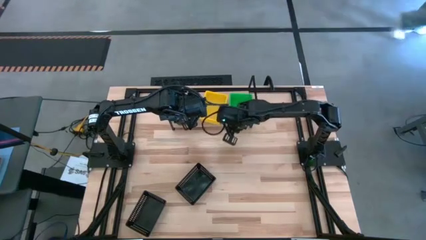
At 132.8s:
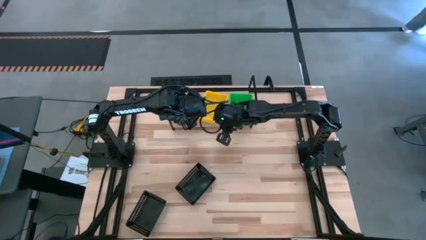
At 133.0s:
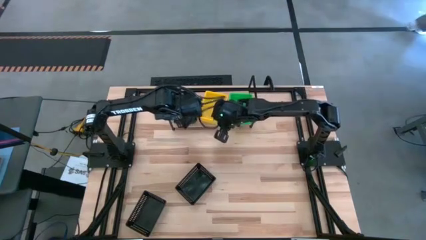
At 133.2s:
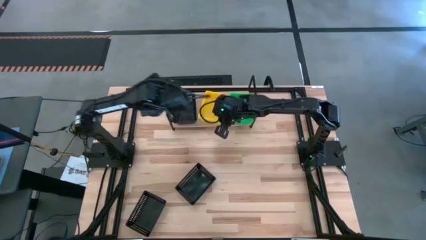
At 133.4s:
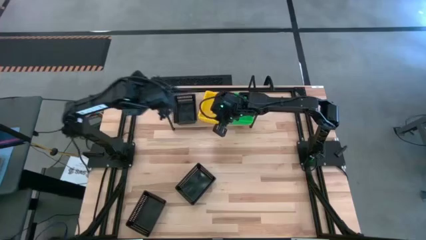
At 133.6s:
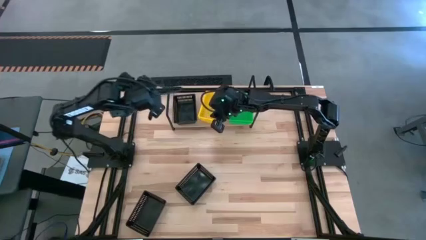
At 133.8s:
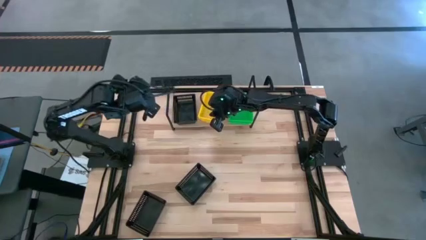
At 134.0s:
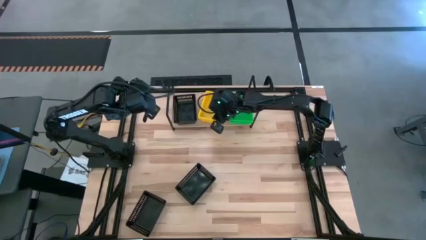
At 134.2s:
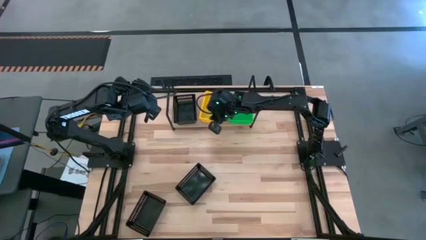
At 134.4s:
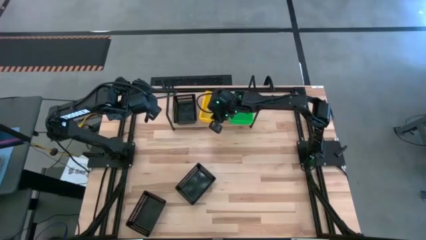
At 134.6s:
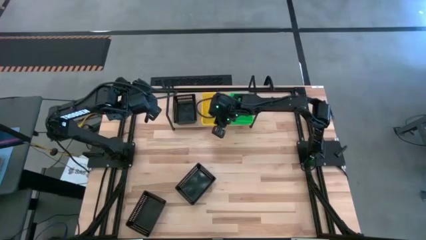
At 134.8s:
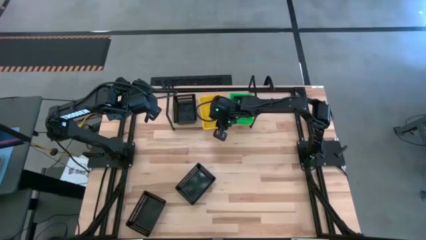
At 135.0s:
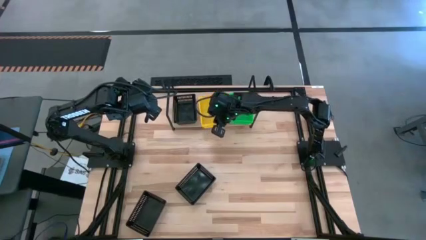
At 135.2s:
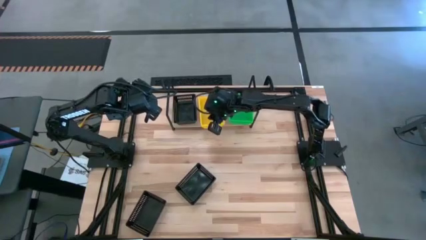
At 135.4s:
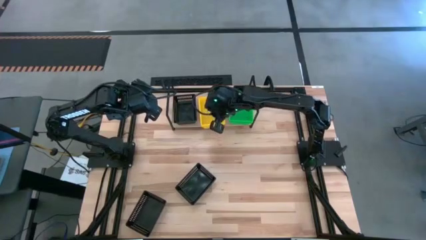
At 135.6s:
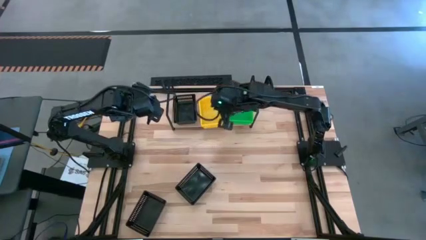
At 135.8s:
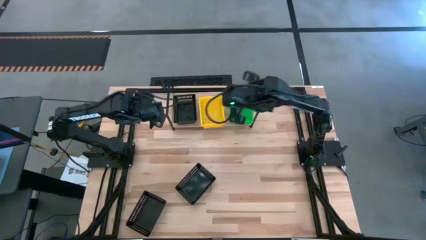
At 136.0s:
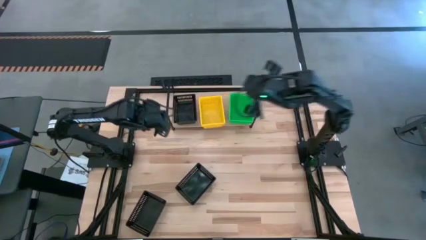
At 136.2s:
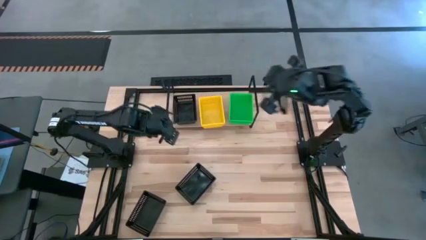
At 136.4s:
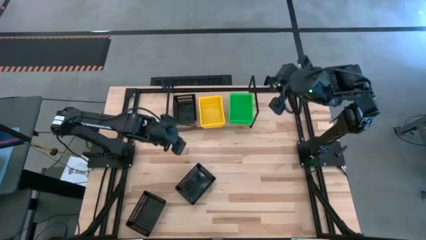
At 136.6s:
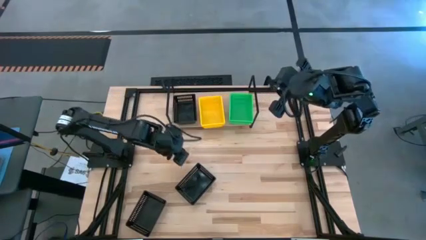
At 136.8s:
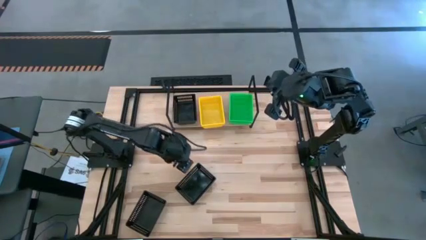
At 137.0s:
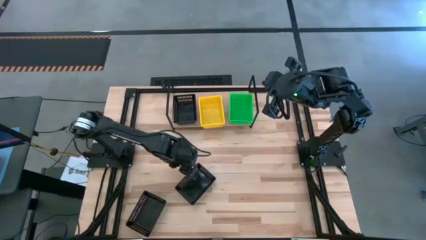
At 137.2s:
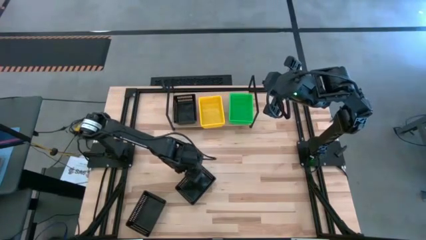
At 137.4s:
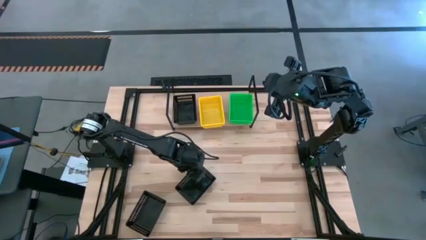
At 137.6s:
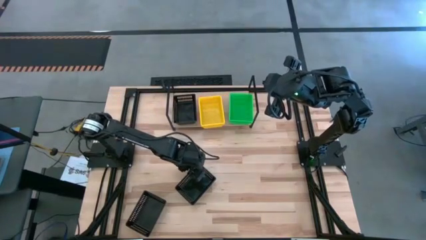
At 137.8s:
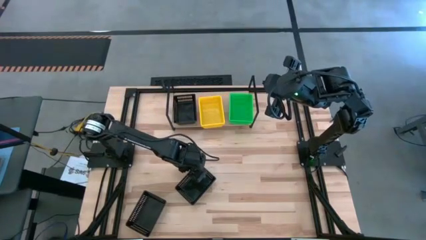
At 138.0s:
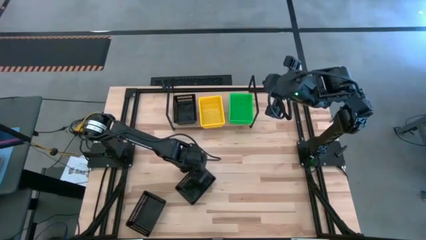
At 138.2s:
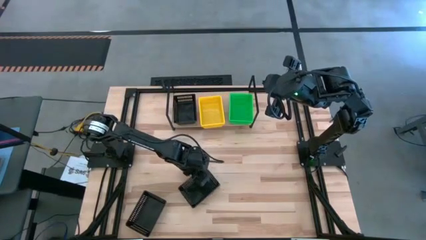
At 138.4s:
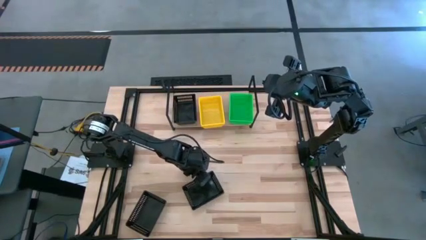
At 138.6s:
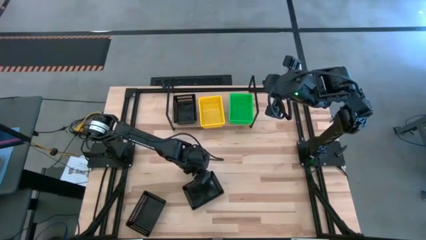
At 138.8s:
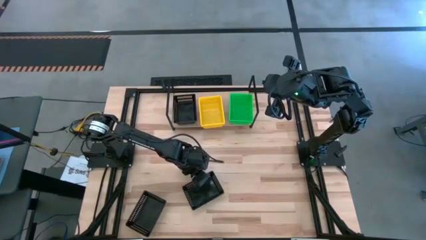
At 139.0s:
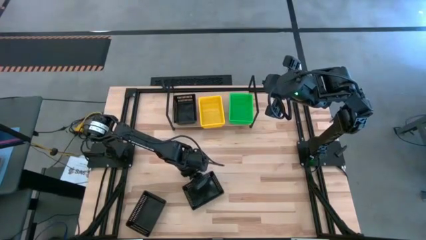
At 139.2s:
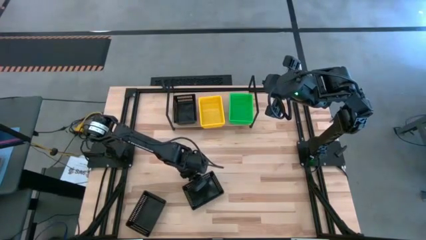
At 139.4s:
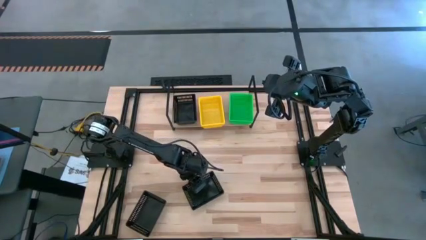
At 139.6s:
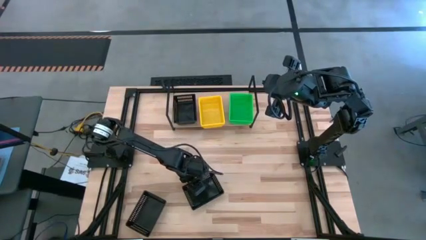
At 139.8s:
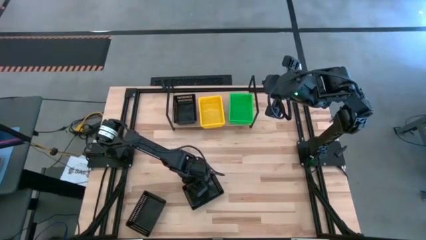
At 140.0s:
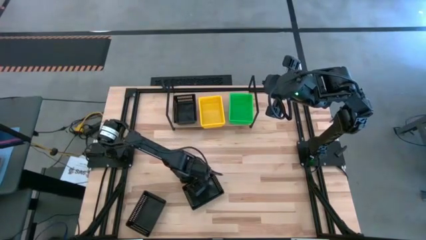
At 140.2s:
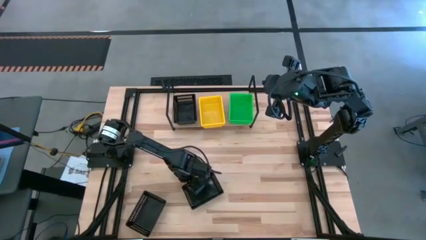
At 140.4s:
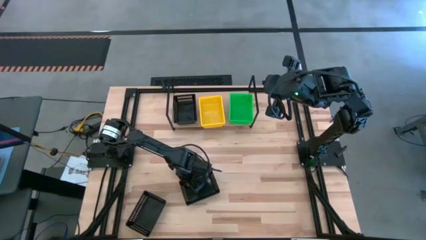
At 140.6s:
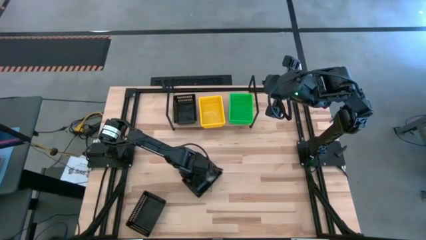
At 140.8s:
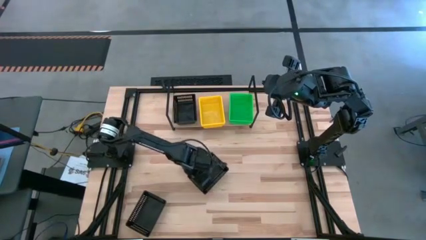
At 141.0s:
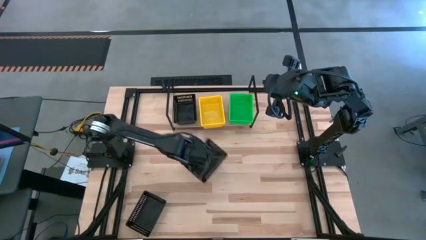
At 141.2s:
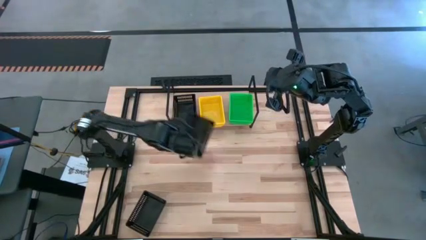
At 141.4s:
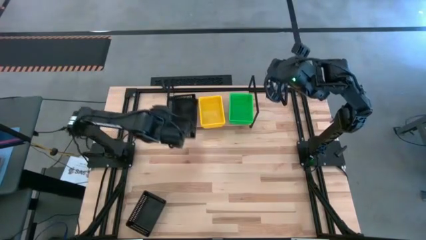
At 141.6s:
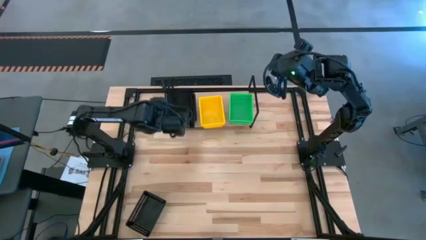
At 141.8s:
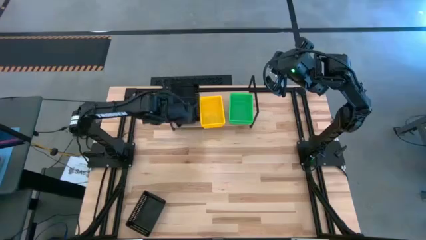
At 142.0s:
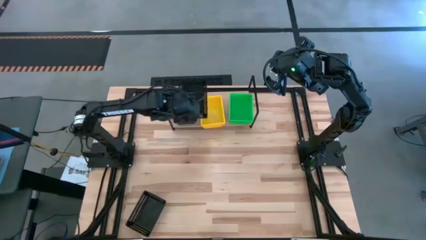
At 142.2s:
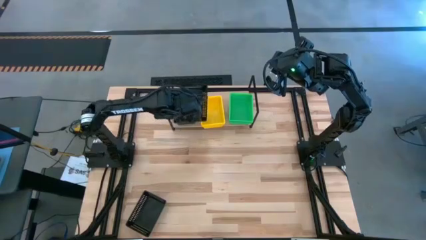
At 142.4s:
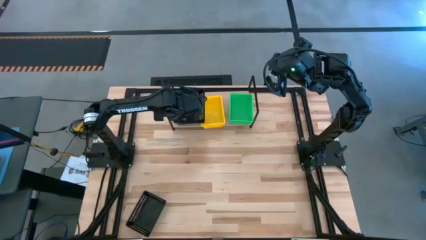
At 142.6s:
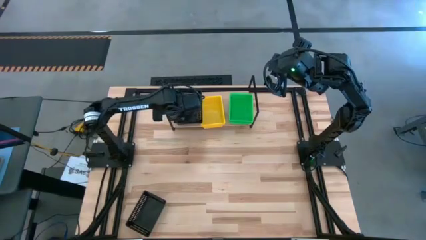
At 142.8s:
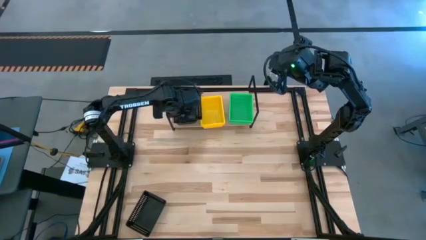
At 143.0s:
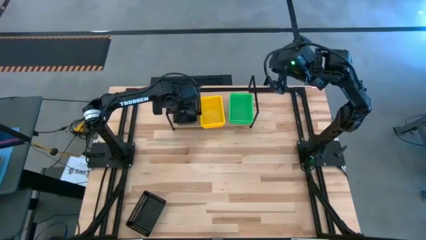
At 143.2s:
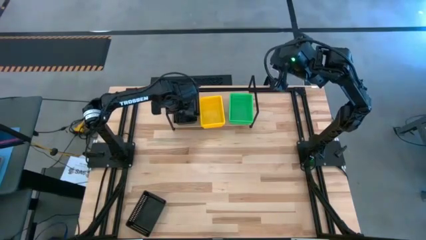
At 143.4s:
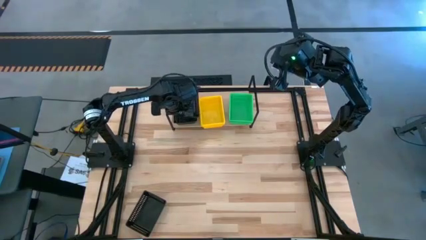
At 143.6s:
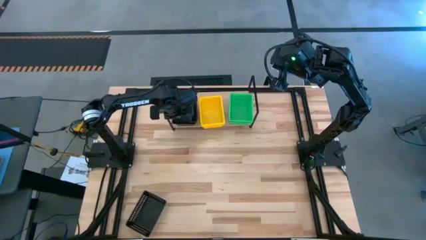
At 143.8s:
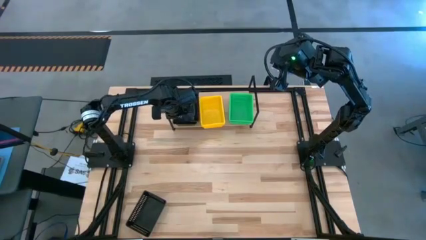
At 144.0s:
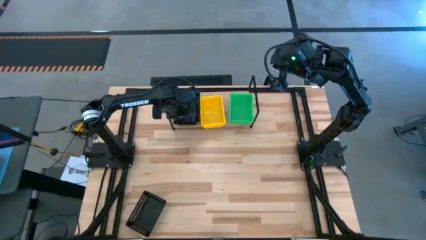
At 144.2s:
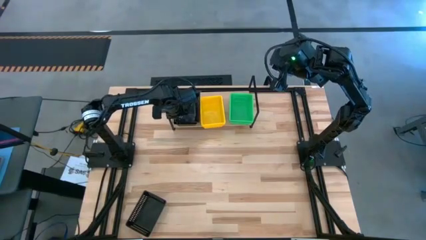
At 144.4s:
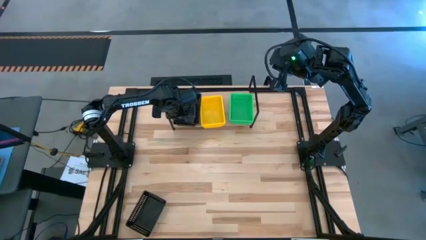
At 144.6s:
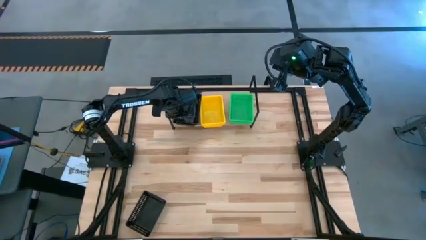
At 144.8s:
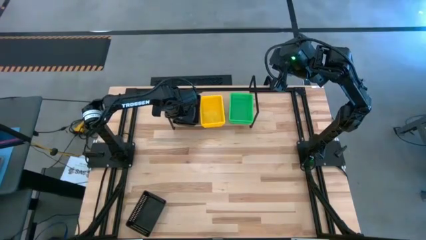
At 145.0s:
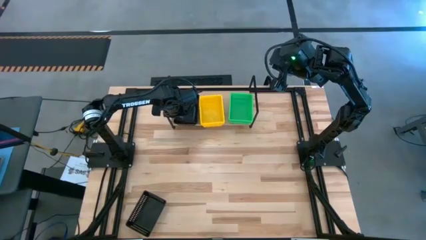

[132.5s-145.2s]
Task: Stack baskets on shelf by color
Stack the top black bin on top of the black bin on the shelf

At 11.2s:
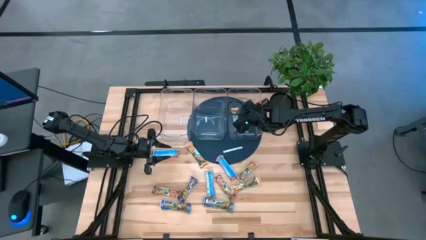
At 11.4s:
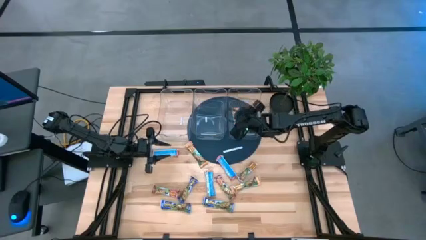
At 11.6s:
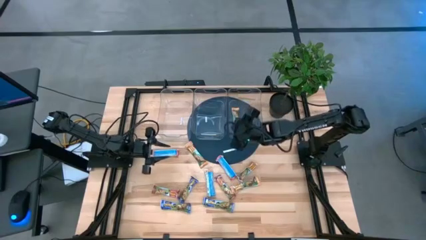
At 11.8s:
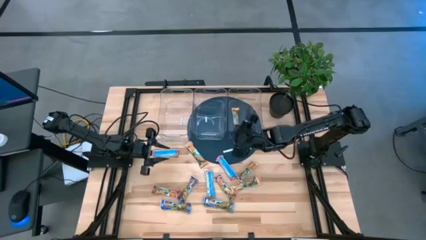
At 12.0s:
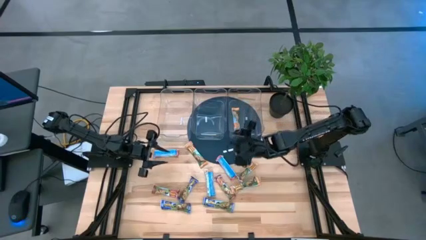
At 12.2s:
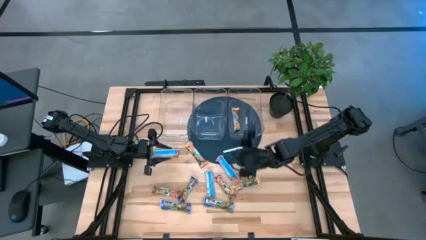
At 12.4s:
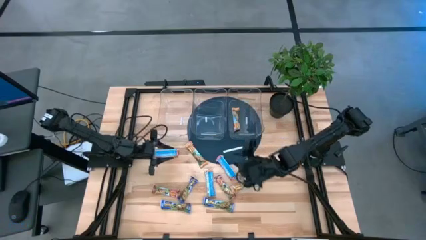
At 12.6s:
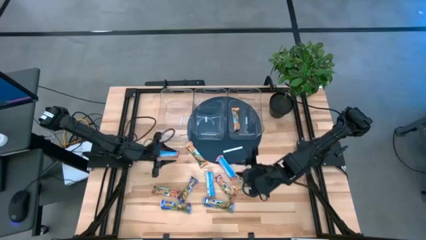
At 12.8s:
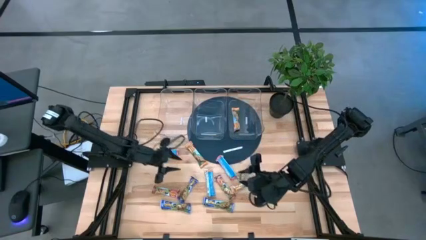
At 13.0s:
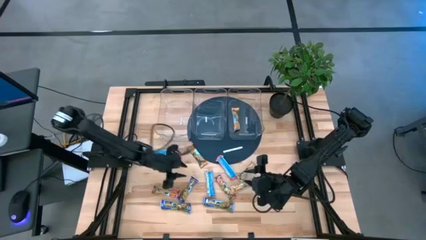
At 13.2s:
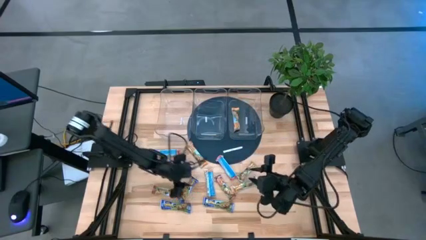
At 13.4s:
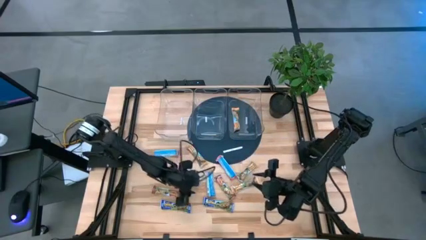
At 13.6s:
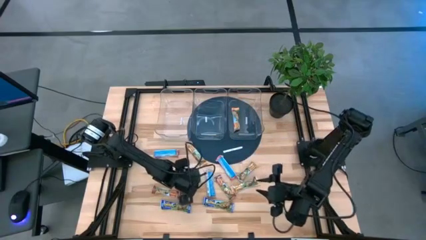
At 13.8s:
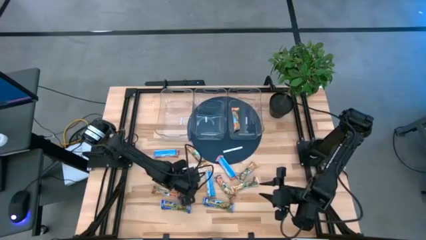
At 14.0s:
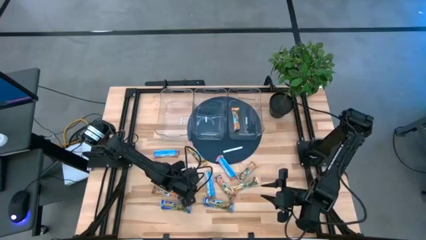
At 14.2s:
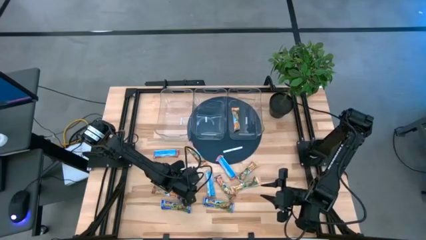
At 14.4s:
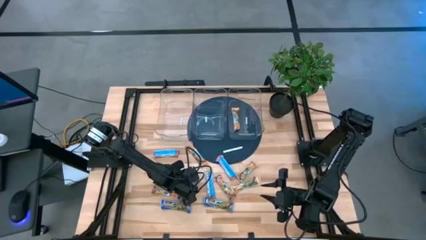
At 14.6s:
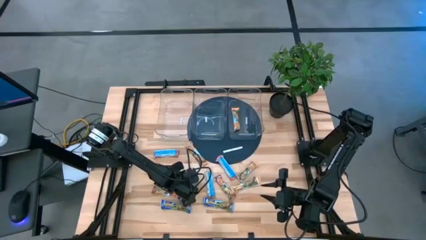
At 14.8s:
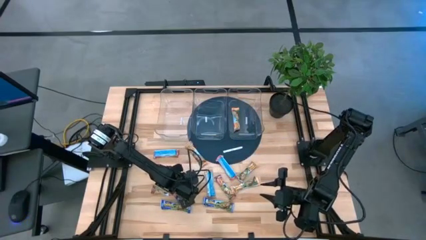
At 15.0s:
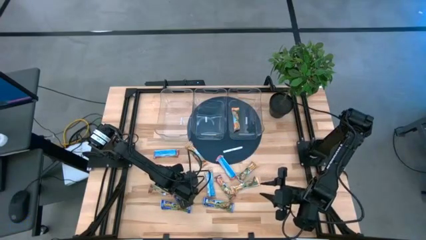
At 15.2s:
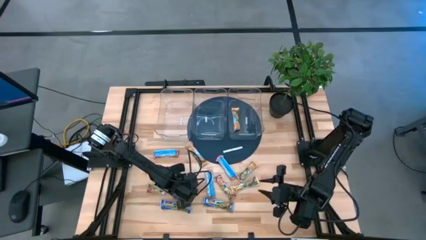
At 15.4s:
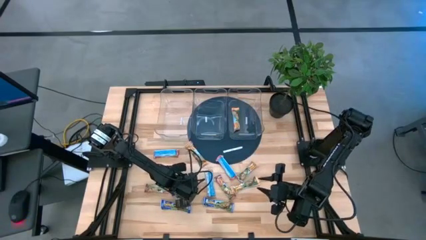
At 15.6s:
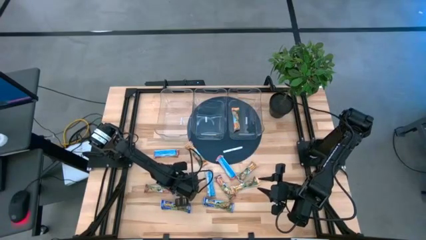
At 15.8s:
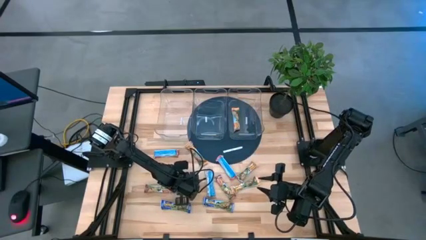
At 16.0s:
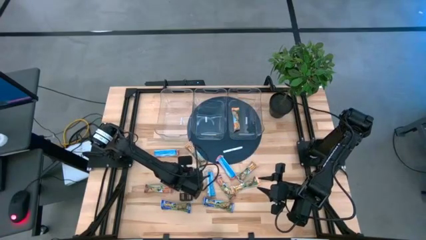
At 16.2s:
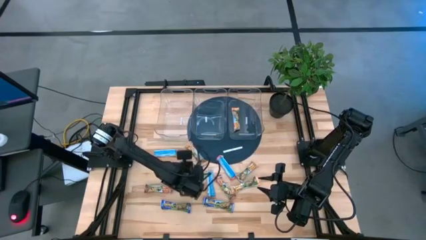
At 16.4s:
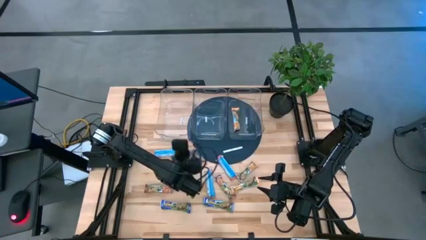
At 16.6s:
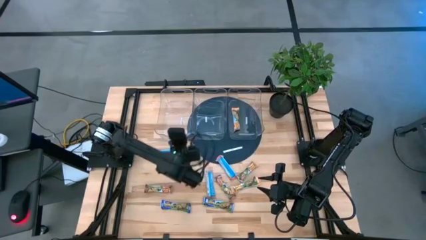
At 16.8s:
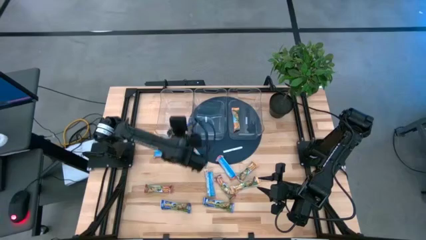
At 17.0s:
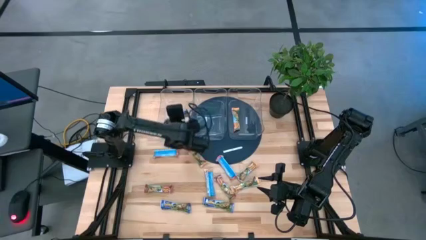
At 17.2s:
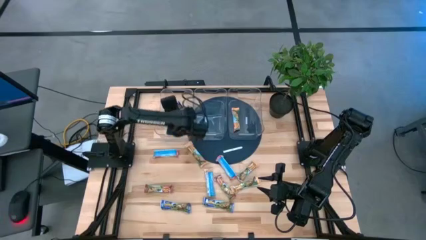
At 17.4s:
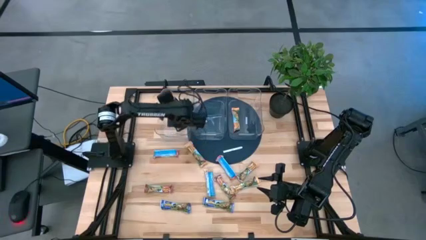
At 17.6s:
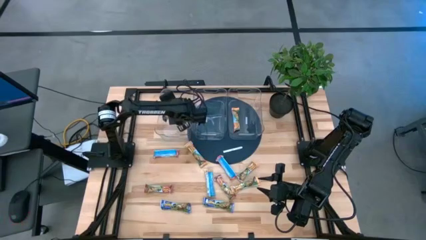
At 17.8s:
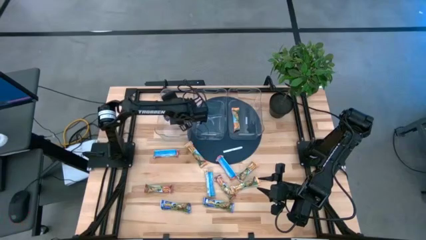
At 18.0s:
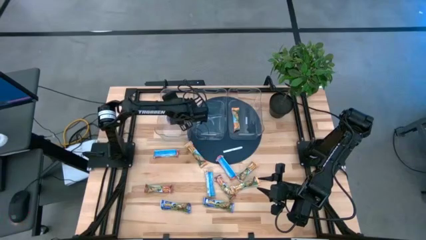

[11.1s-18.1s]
Task: Pick and place Granola Bars by type
Put the blue granola bar into the left transparent bin
